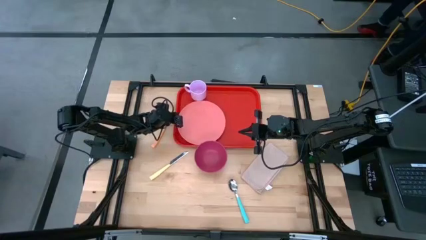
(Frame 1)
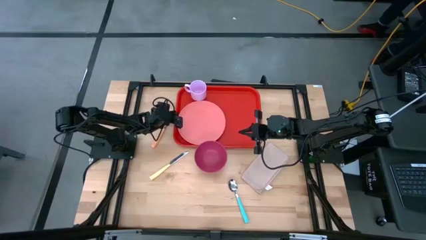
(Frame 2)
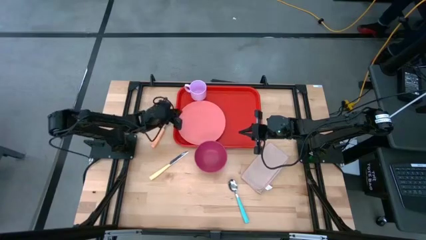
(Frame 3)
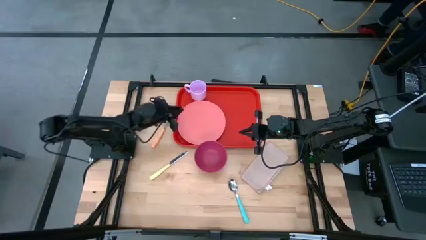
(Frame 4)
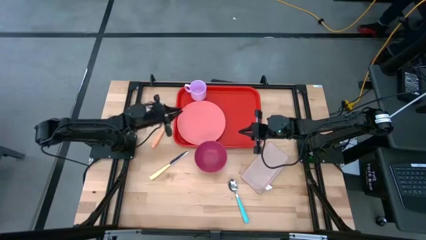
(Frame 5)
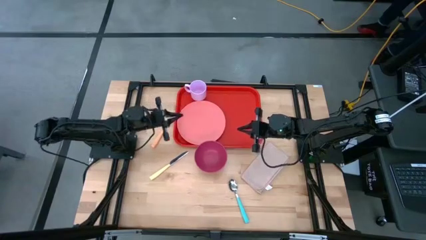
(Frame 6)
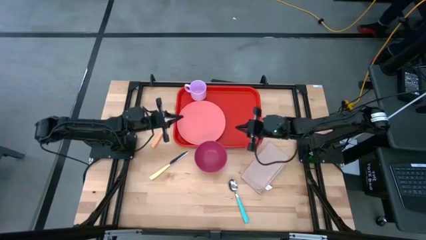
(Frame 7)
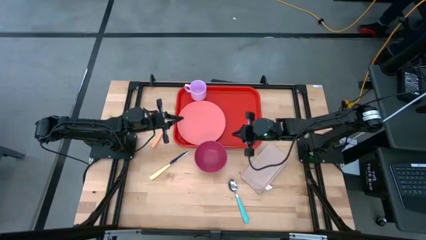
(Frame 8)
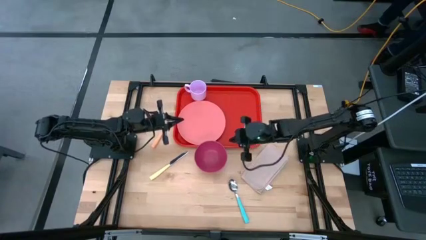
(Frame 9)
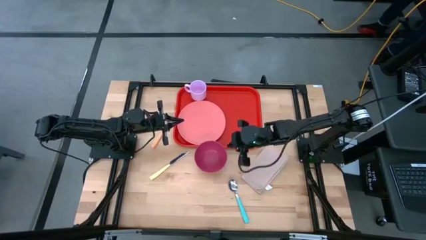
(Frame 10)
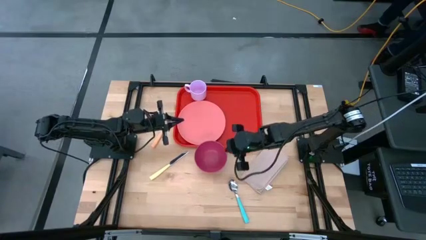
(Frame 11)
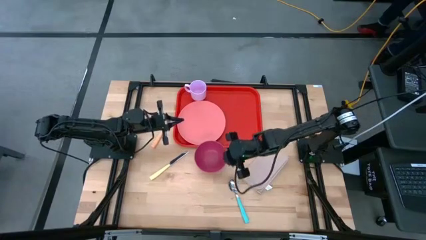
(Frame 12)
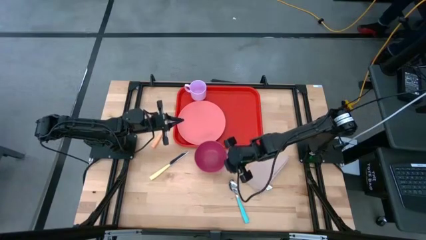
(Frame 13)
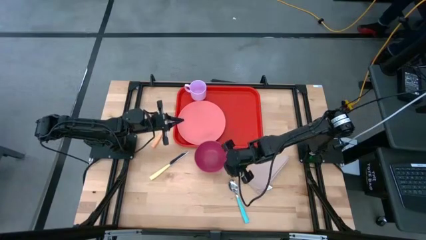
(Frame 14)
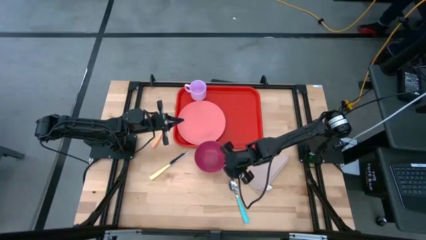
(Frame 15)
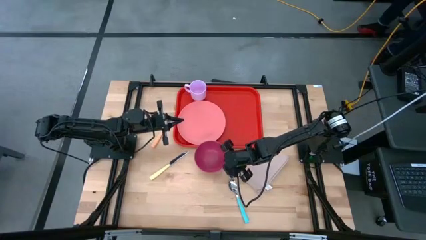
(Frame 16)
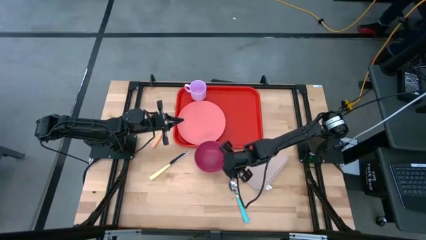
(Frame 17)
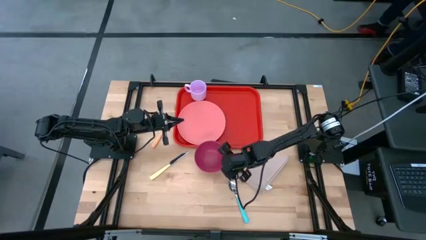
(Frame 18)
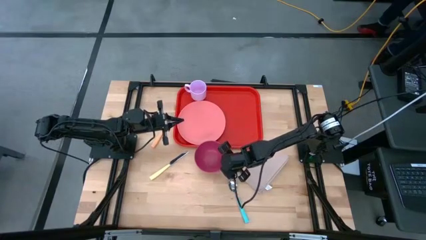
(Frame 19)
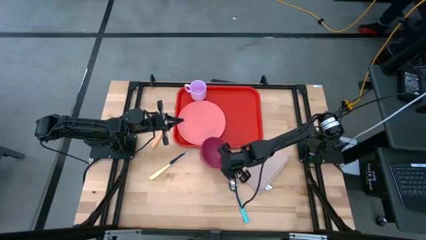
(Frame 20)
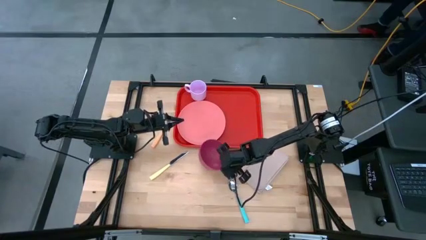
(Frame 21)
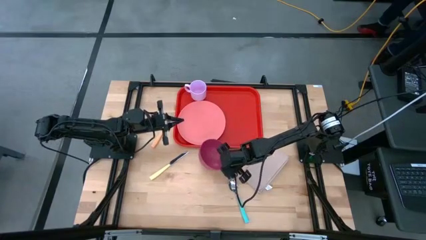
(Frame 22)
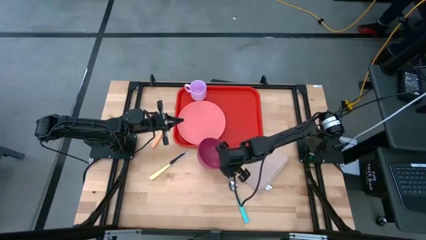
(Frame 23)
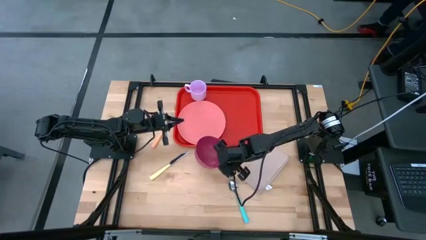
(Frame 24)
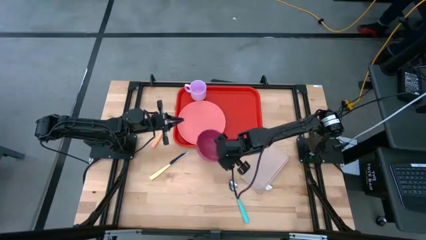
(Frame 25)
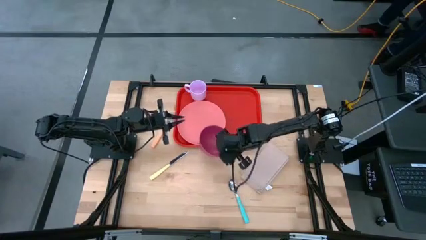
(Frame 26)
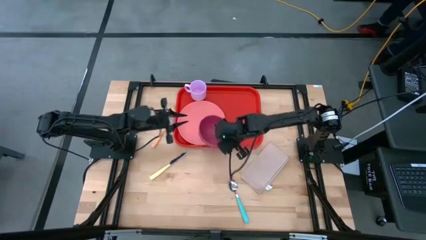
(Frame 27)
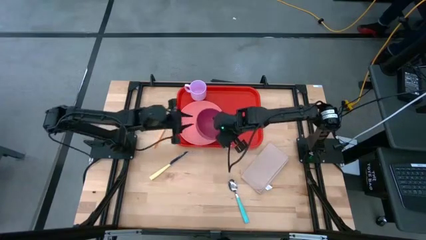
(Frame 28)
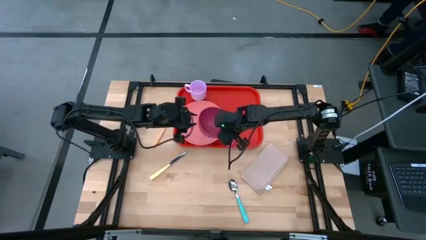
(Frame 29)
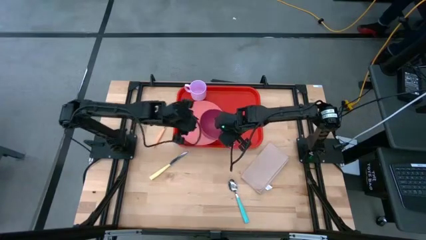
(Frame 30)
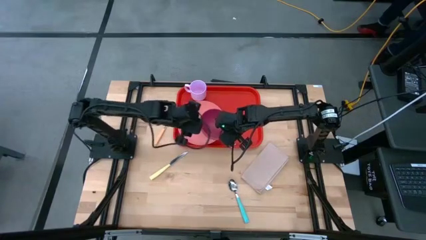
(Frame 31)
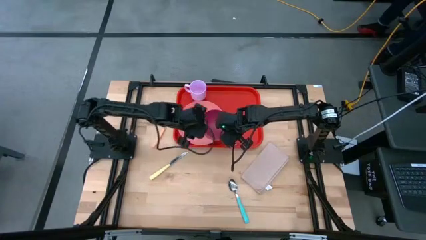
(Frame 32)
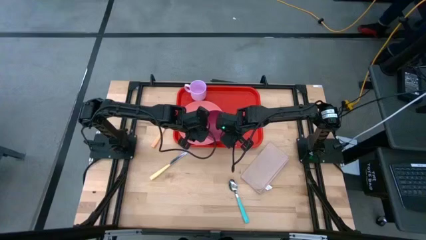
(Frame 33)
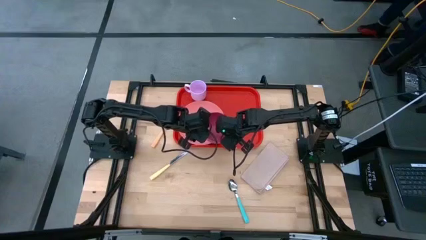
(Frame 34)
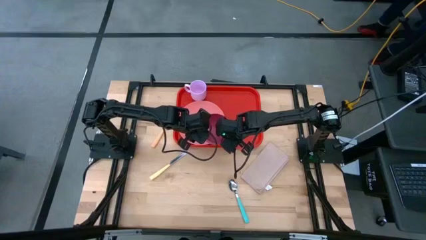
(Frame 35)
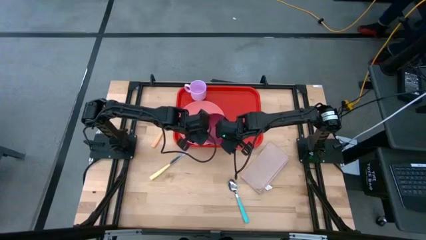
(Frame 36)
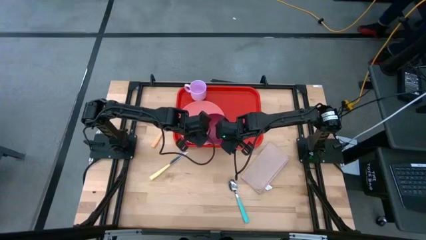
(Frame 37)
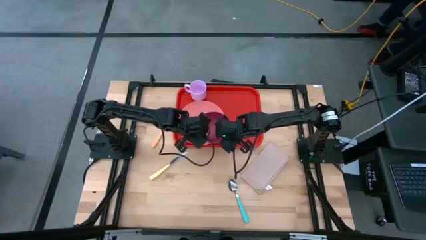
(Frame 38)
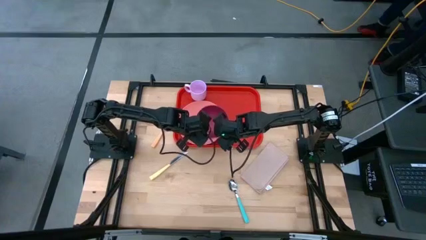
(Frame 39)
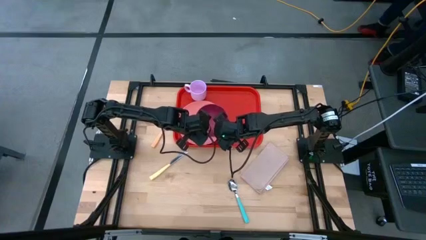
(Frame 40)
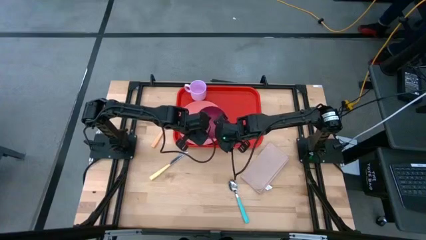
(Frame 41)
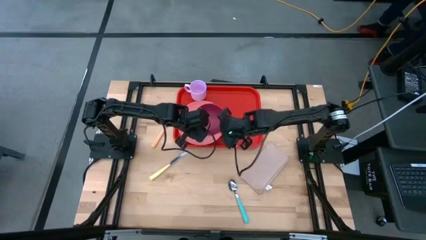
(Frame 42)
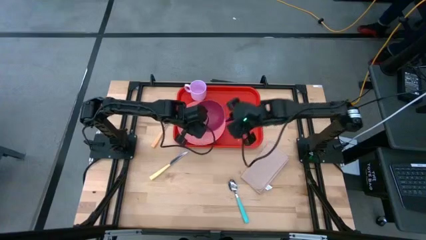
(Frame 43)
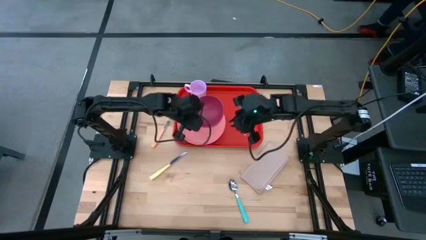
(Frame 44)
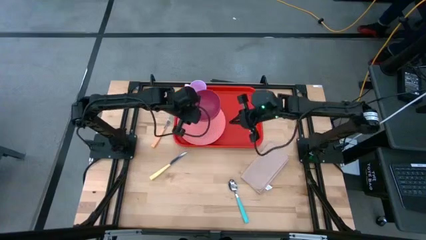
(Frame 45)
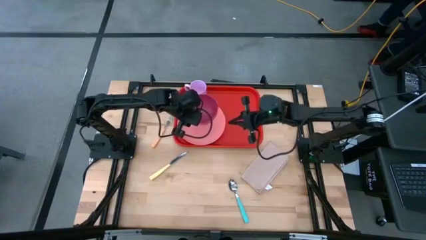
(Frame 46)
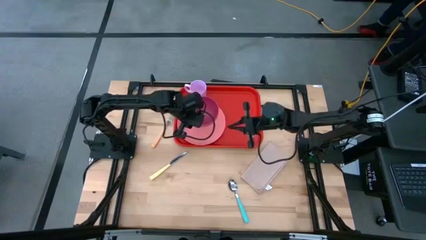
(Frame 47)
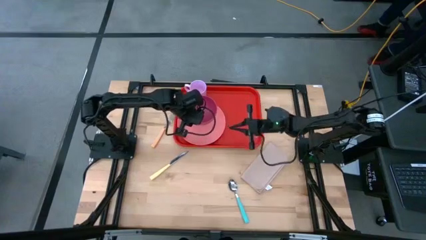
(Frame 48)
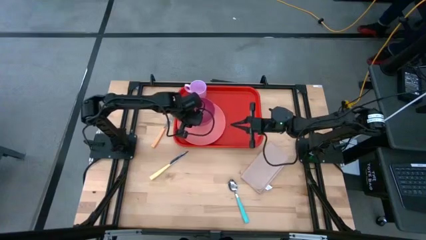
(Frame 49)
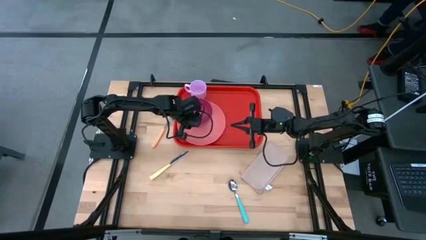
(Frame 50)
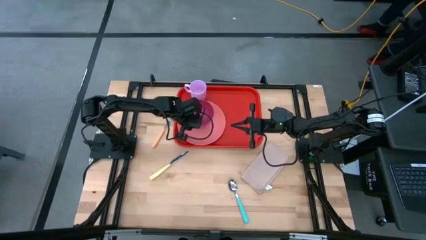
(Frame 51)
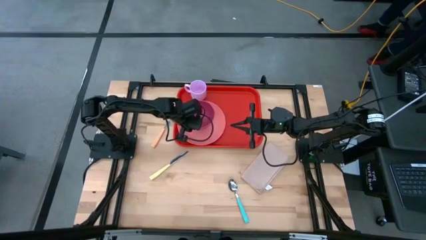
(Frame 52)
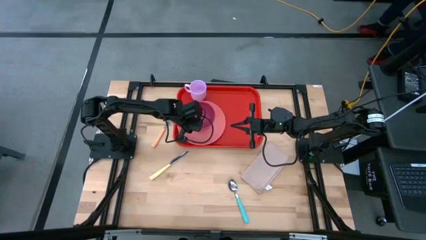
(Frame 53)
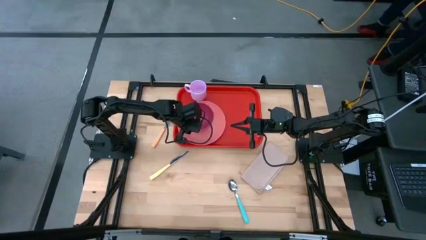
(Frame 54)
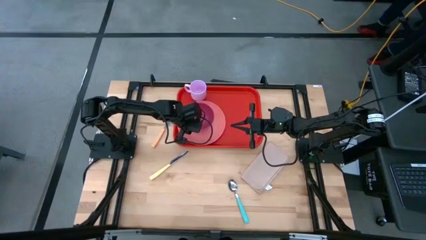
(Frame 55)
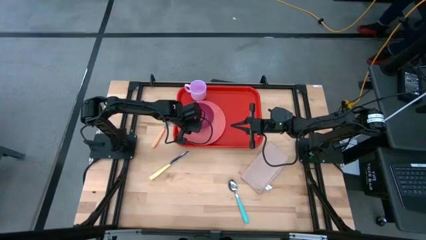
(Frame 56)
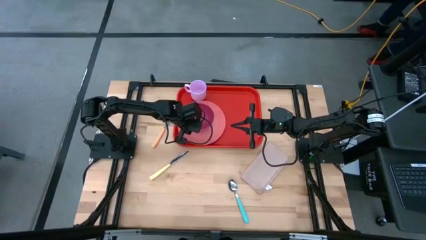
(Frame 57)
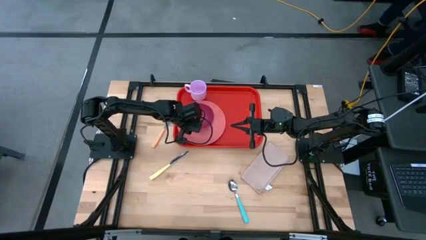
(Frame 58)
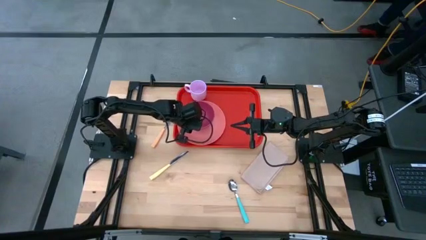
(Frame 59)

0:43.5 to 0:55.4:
Task: Set up tray
Put the dark pink bowl on the pink plate

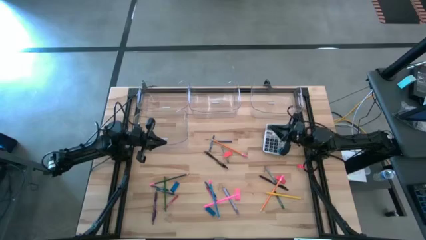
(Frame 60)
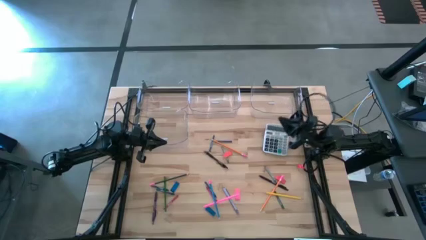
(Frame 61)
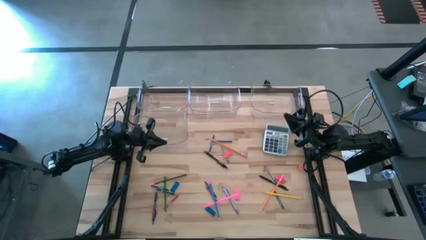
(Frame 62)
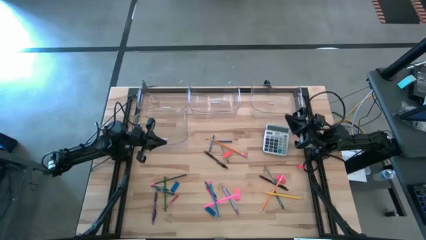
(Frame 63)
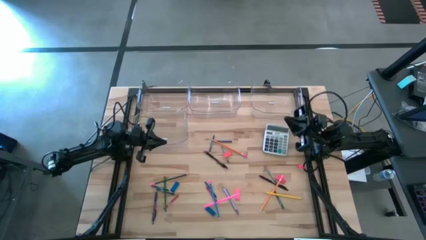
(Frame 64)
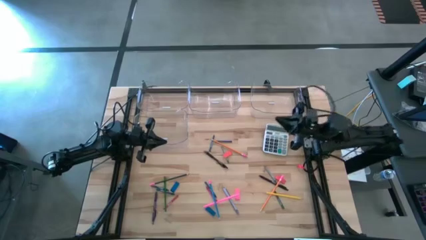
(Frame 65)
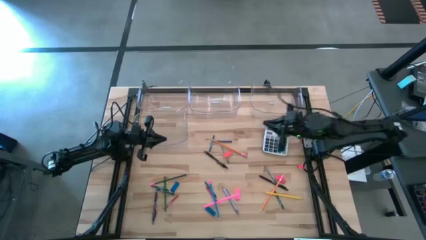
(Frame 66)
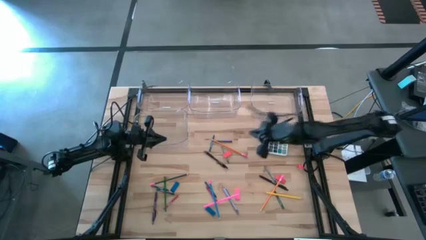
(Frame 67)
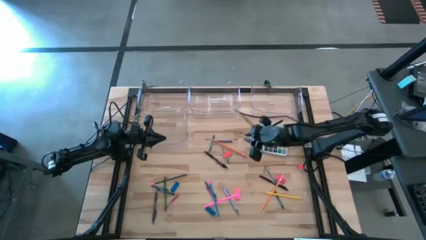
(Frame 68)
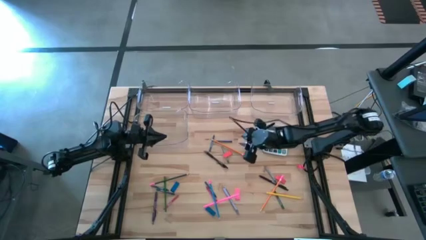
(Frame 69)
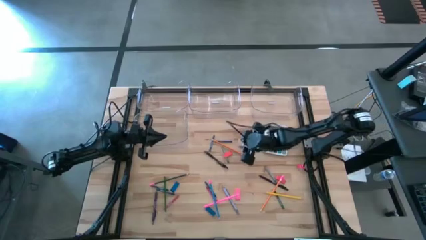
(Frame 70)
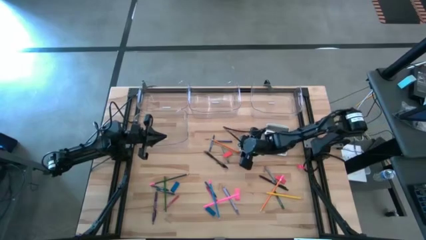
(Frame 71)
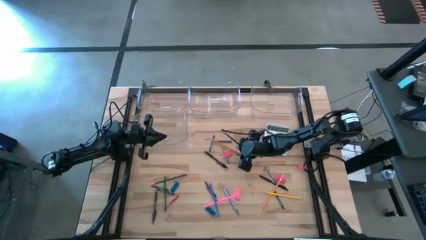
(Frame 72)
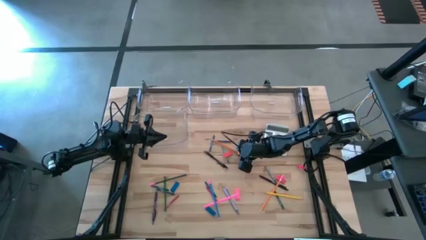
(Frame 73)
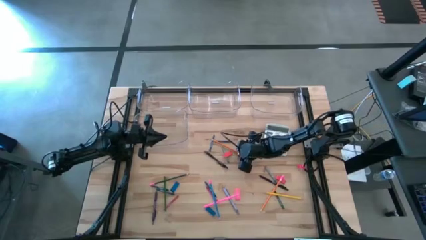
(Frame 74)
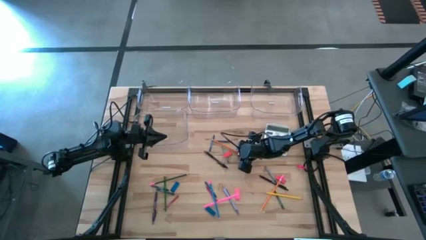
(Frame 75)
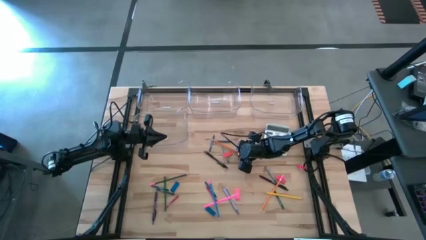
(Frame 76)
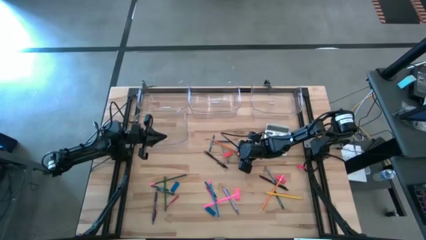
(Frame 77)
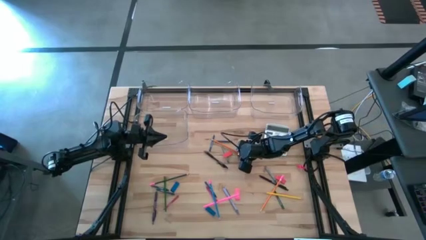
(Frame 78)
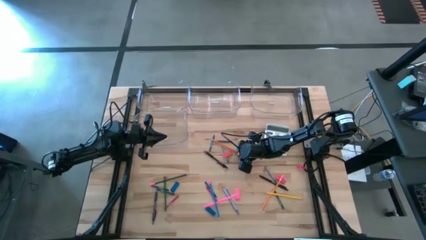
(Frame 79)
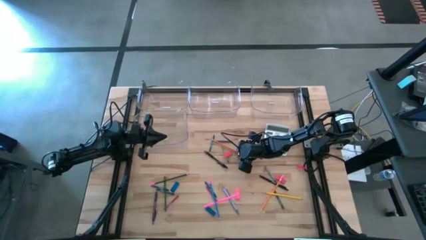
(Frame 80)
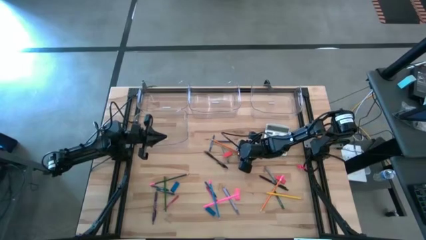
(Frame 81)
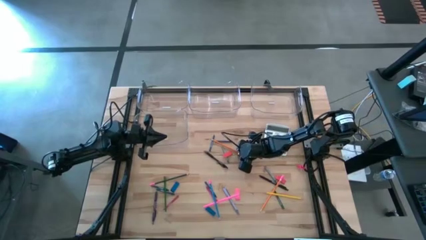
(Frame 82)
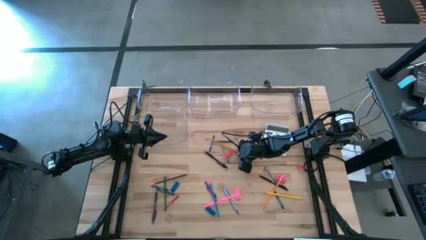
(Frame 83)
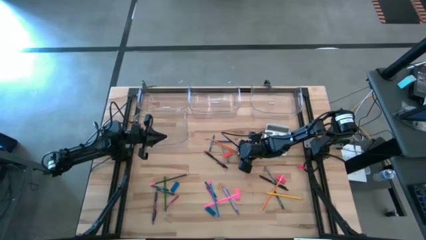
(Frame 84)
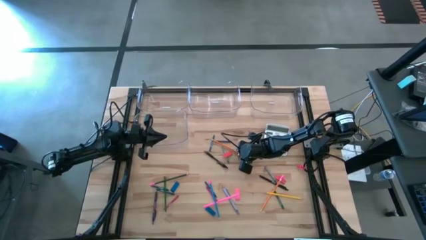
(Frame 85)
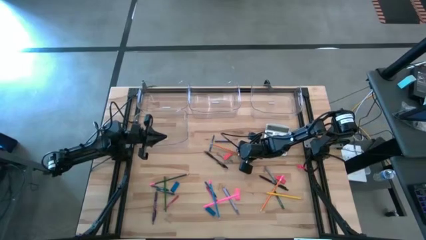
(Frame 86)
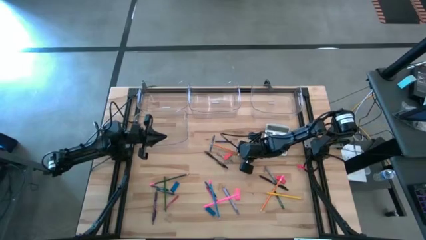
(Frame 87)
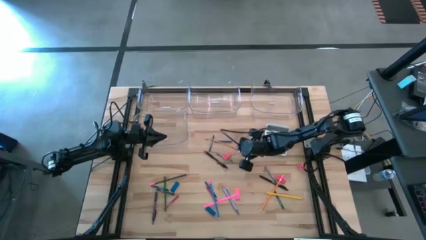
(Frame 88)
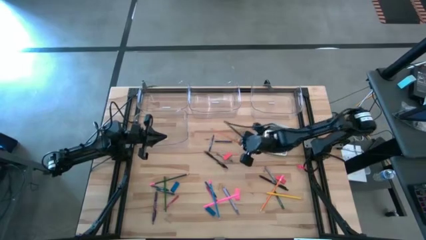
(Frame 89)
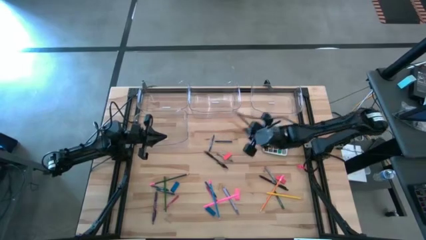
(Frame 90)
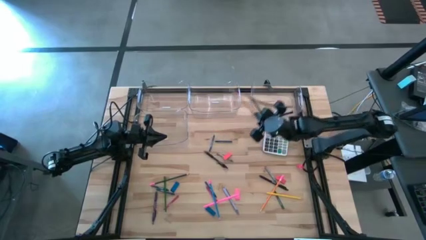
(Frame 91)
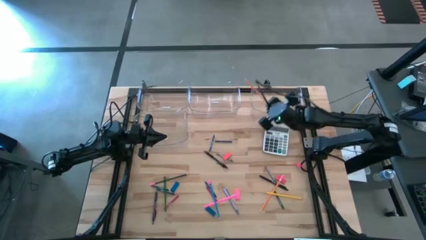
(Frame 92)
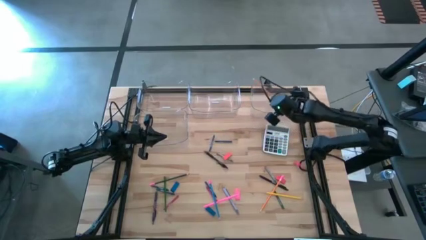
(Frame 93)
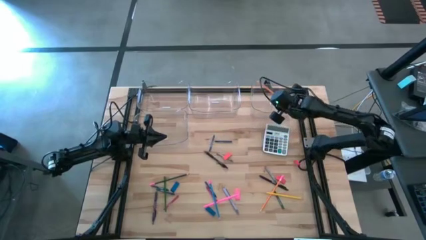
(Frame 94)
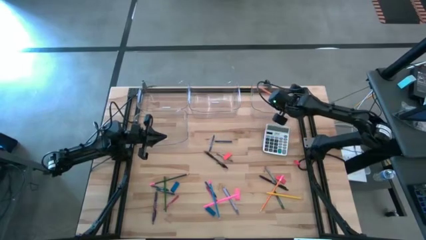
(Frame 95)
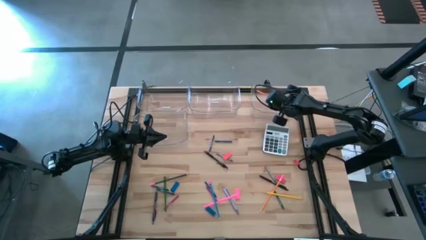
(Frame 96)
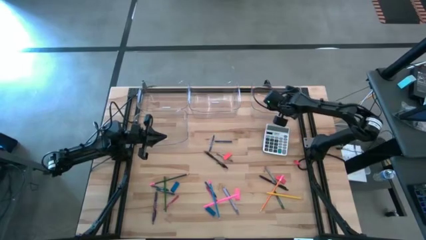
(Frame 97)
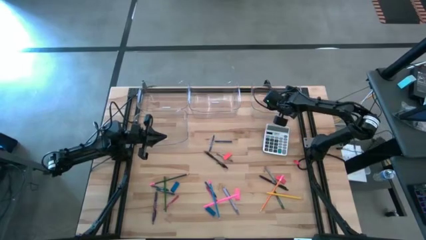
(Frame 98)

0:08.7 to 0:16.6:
Task: Sort crayons/erasers/pens/pencils in bins
Put the orange pencil into the top right transparent bin
